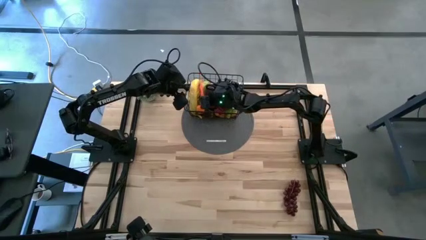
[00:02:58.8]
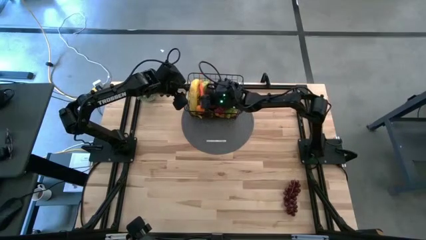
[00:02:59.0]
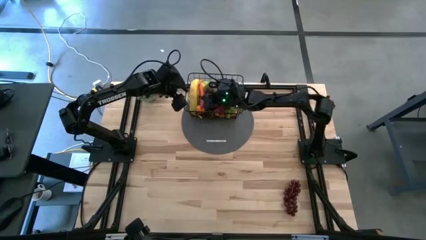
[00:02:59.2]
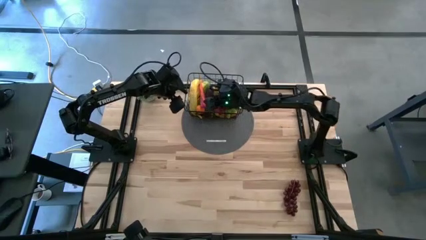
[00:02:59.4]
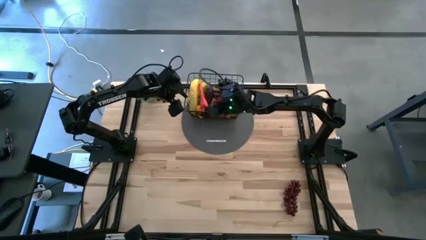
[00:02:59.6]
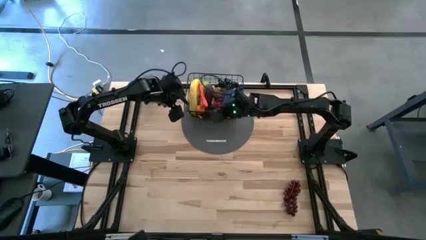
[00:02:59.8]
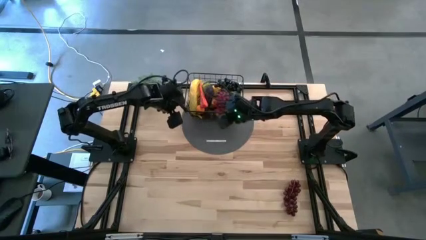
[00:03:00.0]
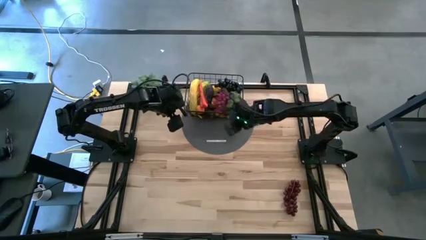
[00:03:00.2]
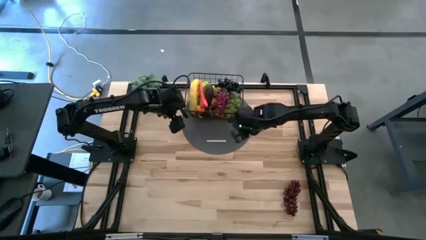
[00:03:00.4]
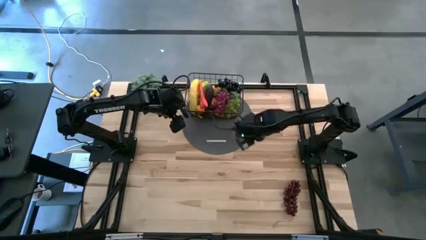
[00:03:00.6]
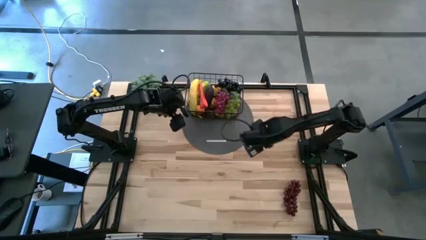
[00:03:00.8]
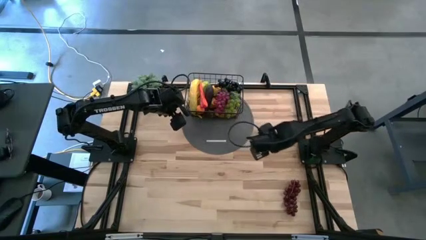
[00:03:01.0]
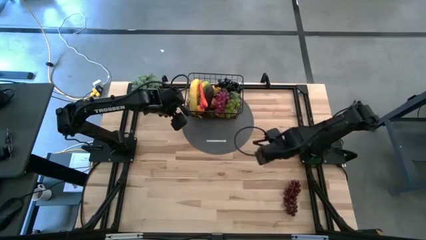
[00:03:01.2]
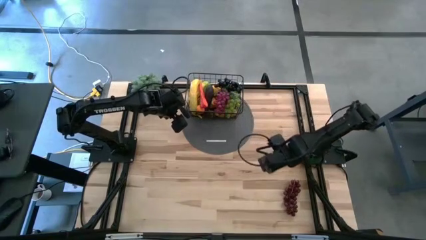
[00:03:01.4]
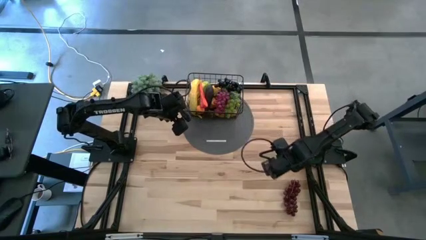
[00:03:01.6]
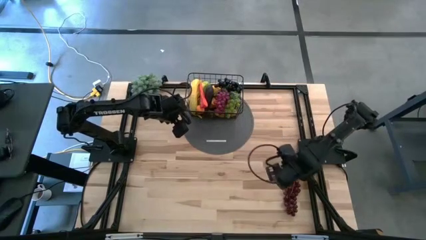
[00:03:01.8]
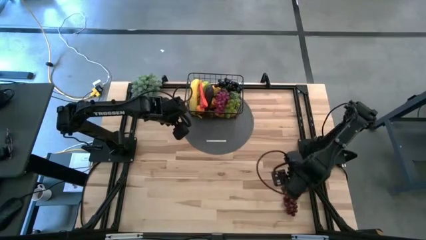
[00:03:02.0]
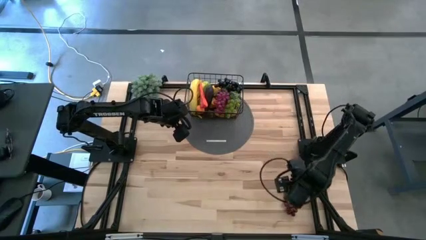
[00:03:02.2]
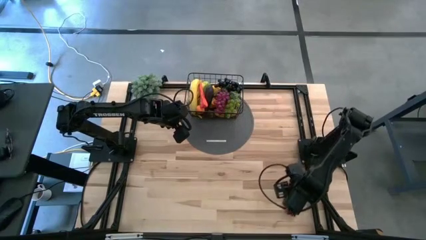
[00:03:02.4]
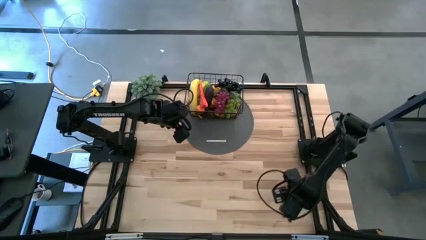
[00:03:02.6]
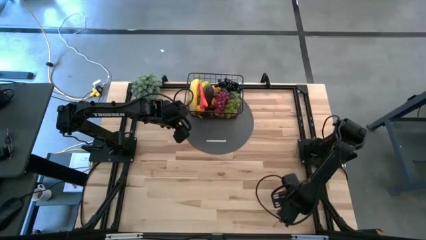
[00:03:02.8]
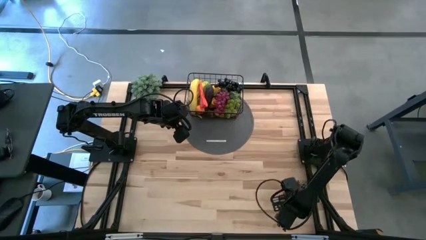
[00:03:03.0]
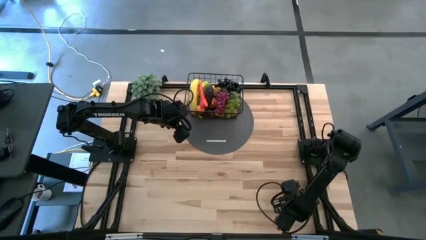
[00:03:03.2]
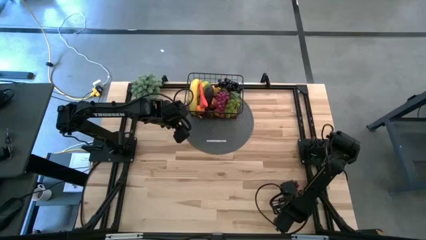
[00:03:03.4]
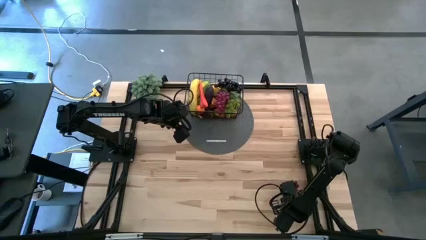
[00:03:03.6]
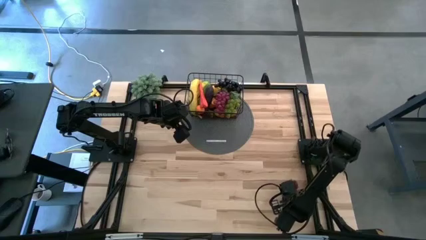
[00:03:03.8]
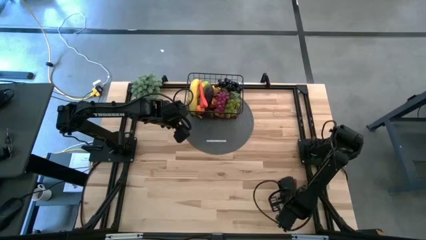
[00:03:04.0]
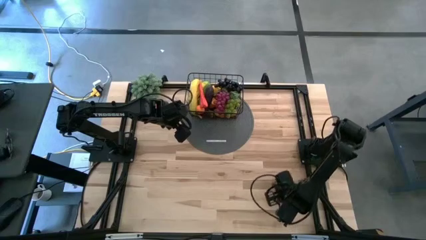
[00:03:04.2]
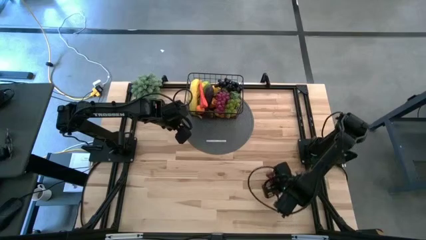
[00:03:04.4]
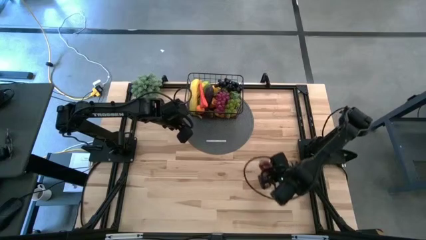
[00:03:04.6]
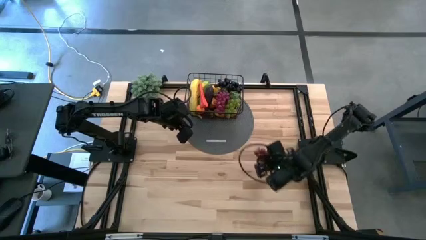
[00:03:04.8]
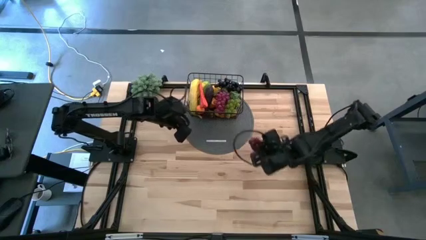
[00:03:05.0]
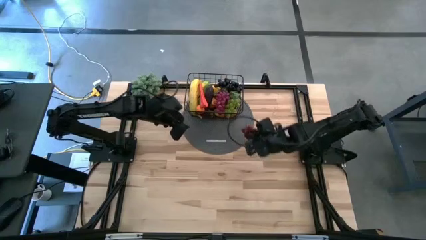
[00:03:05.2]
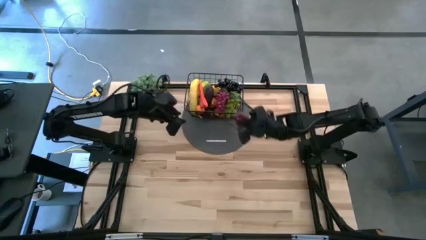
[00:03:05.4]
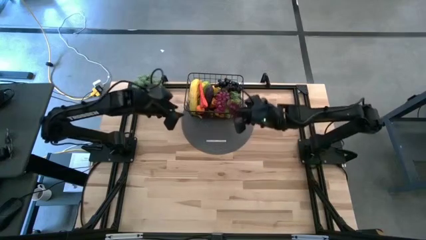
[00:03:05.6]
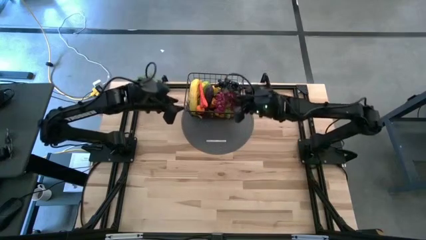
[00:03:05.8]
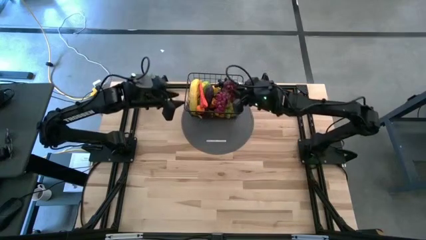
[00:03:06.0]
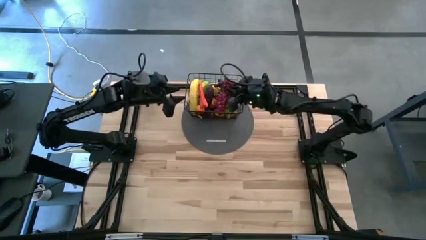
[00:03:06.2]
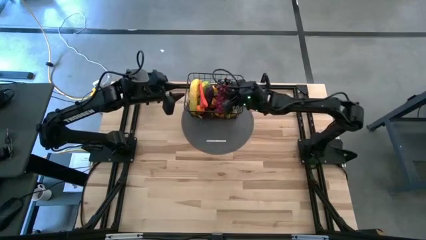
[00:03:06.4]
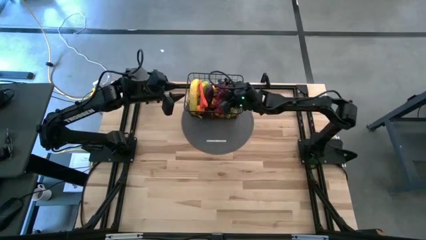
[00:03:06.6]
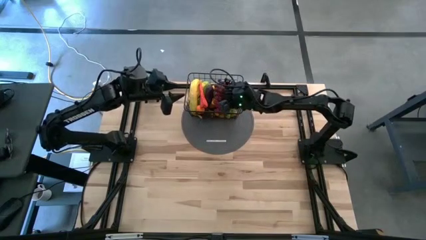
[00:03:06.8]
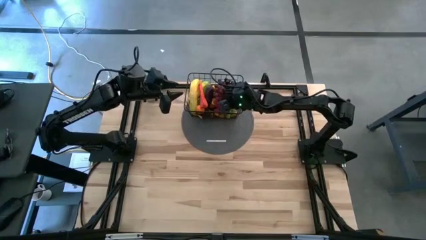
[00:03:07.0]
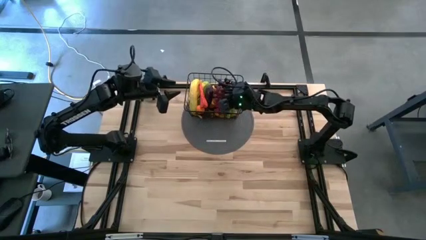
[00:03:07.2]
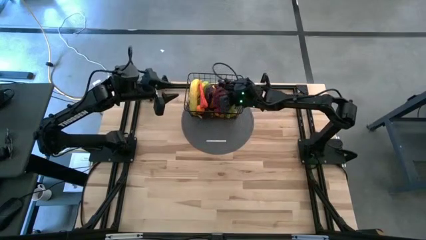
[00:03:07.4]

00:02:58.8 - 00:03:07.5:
Task: Build produce basket
Put the grapes into the black wire basket

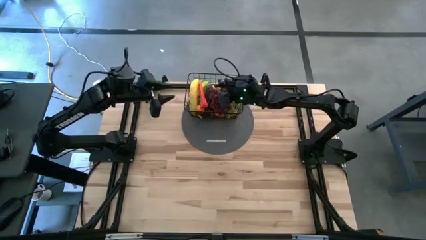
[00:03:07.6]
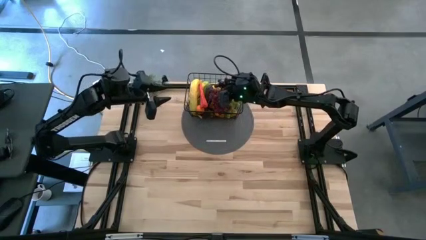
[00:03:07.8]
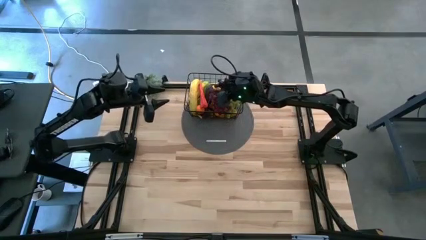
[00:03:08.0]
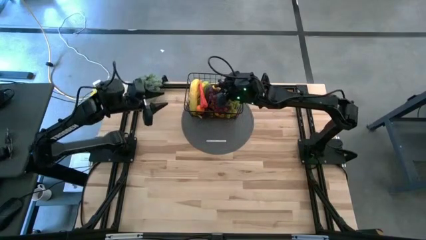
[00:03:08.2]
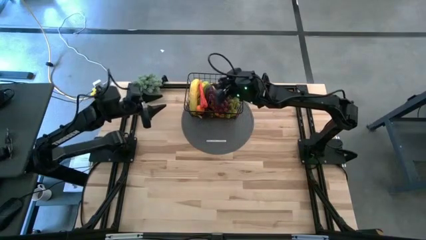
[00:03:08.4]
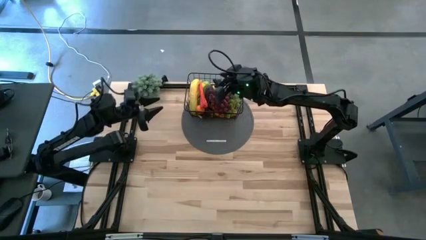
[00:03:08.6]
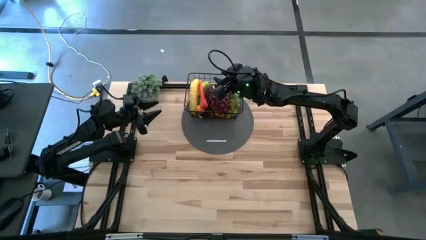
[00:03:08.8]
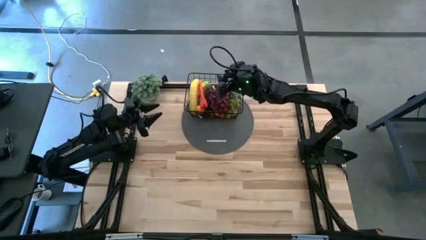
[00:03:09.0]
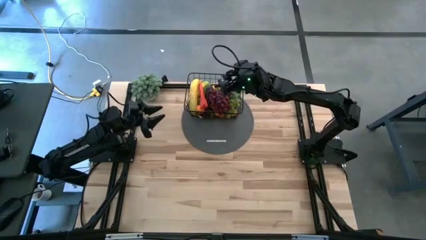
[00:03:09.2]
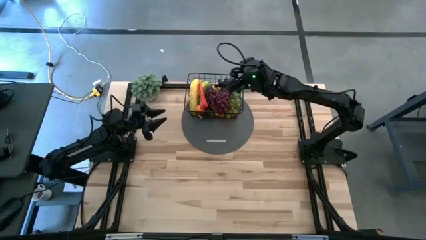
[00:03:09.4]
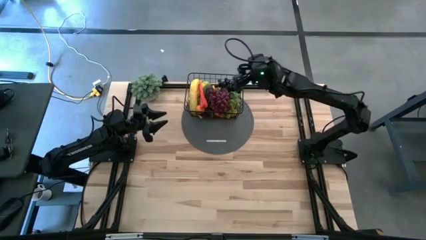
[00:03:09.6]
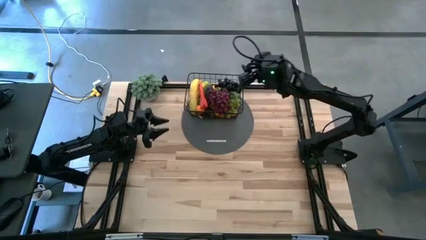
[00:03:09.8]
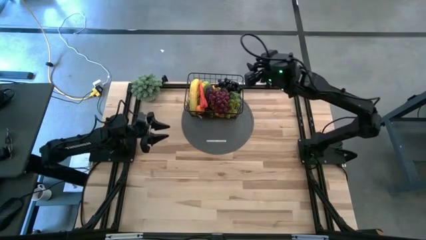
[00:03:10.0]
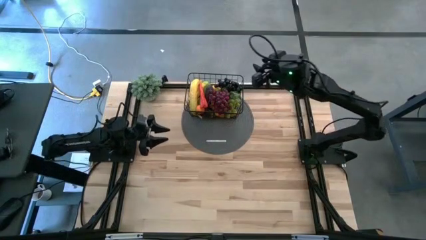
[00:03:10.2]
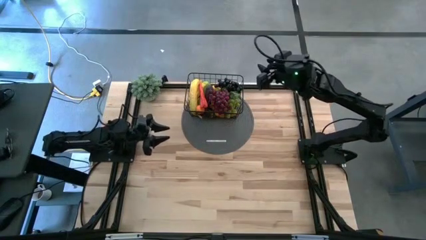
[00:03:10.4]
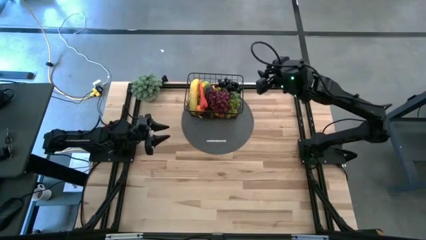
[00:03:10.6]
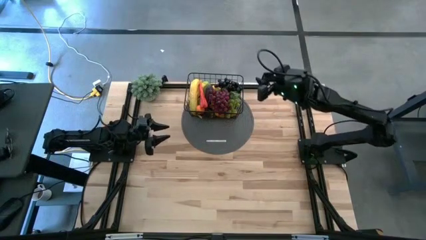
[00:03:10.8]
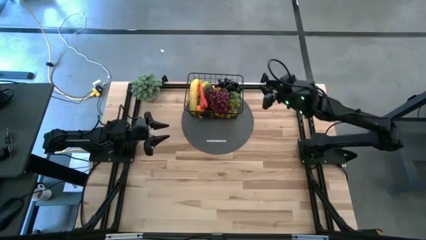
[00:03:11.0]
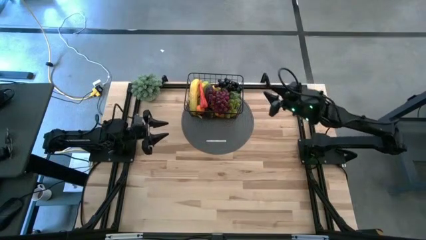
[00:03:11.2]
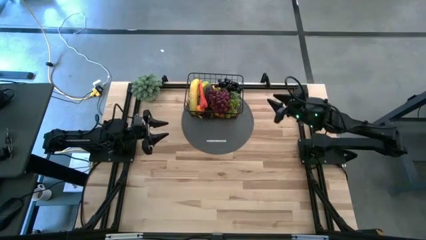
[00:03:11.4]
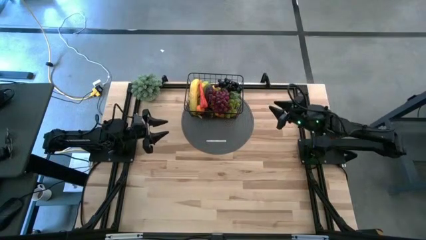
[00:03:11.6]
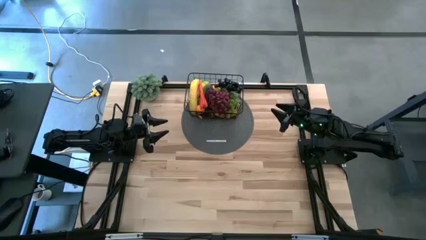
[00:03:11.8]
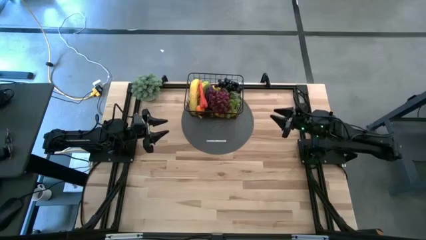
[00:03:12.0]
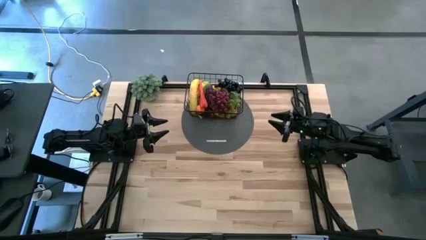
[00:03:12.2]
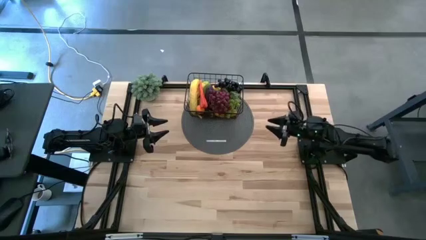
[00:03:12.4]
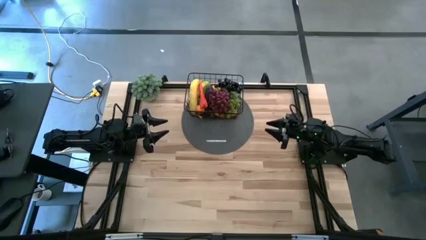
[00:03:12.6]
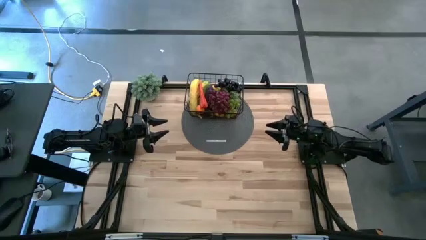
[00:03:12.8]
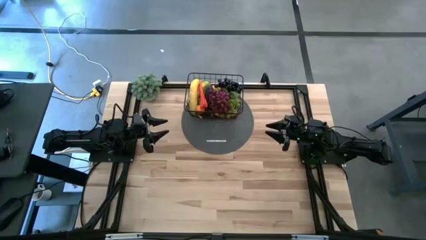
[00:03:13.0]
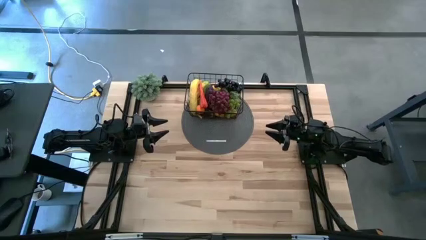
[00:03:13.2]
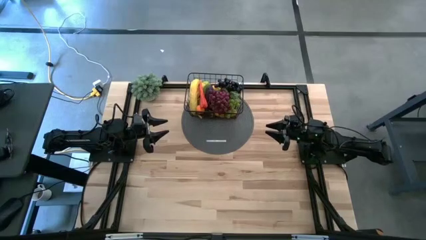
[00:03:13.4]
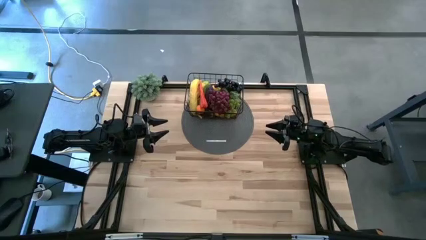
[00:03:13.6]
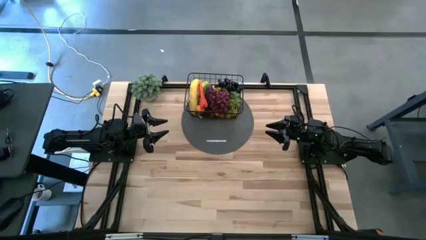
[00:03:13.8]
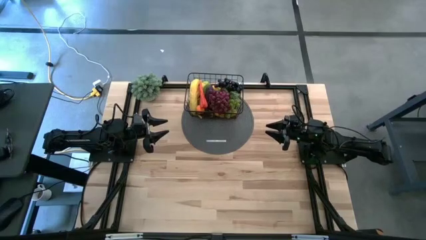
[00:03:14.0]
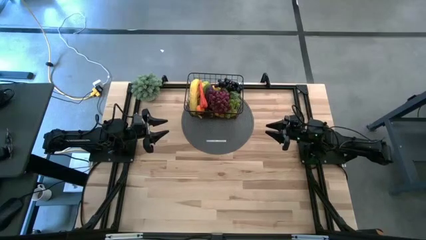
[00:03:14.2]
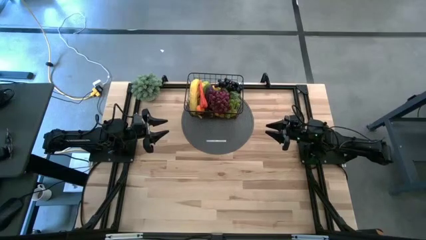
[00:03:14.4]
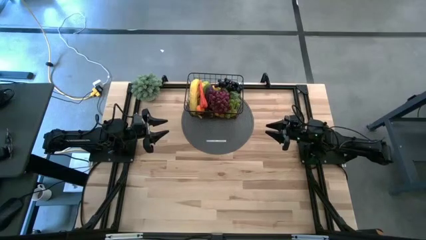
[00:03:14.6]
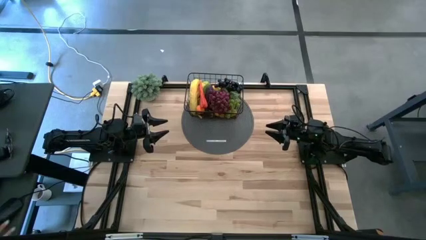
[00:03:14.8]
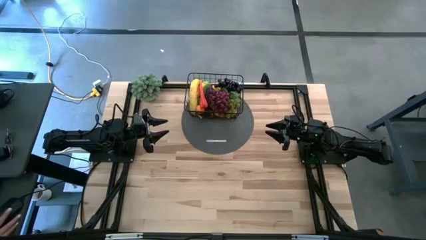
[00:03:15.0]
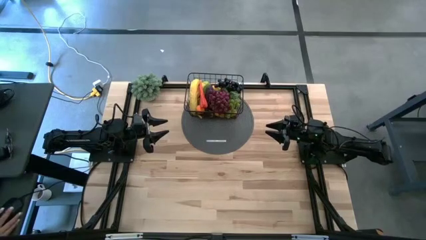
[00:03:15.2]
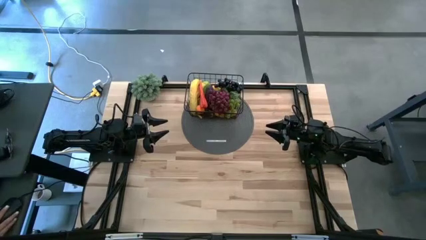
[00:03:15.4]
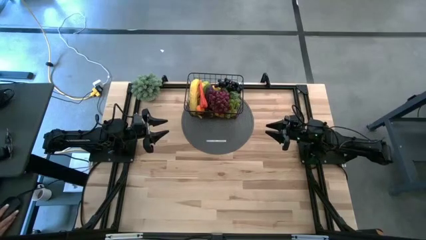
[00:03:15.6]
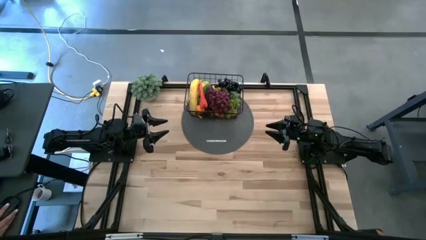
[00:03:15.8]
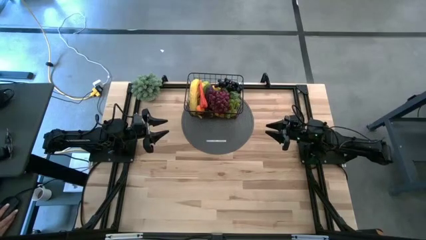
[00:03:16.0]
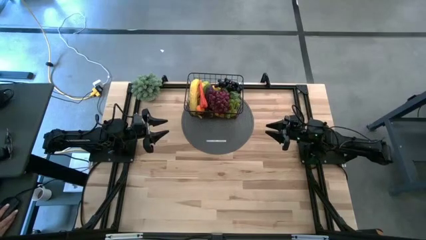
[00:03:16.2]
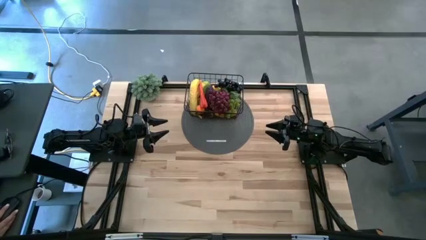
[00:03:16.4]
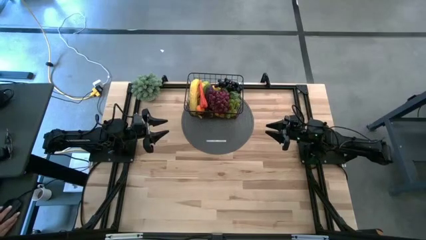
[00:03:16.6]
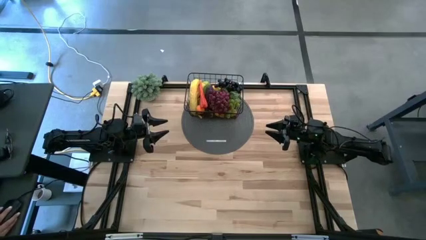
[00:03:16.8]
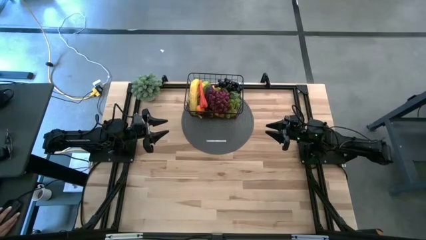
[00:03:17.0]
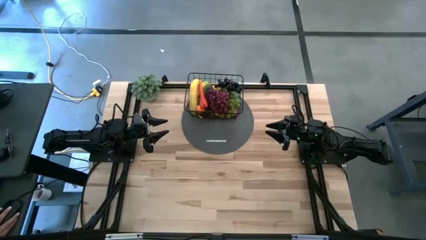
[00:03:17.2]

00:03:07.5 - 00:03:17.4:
Return to home position
